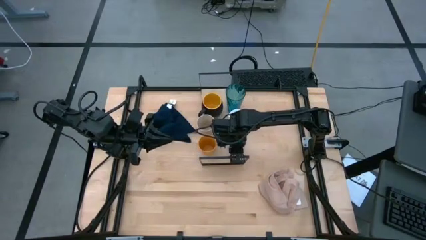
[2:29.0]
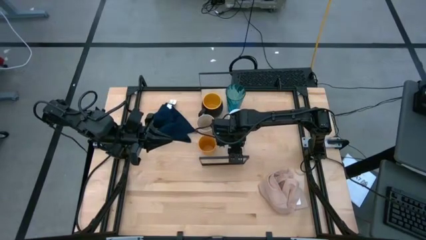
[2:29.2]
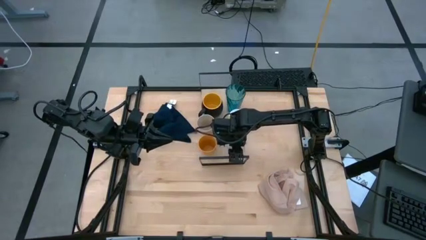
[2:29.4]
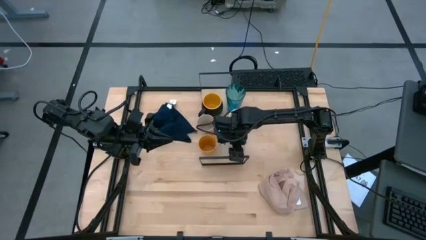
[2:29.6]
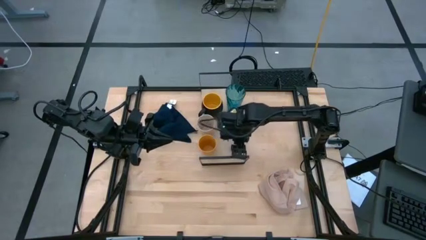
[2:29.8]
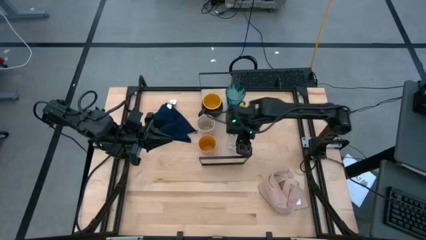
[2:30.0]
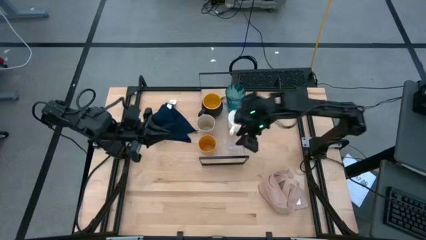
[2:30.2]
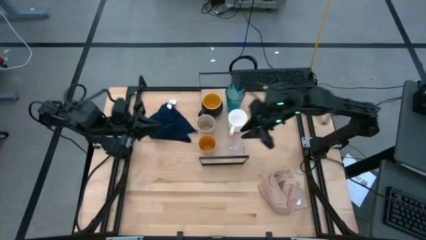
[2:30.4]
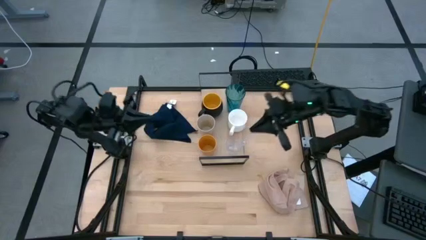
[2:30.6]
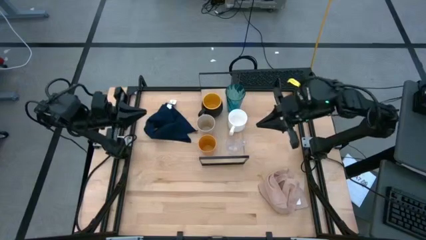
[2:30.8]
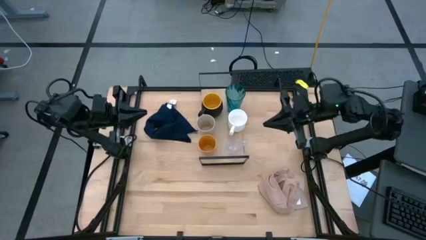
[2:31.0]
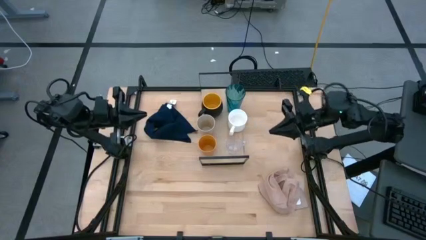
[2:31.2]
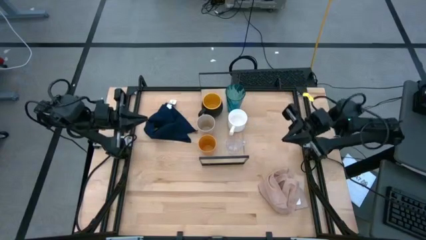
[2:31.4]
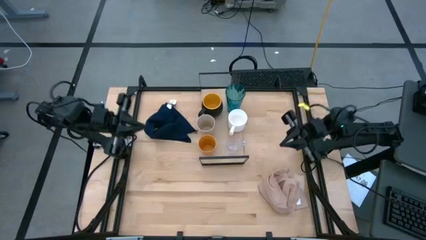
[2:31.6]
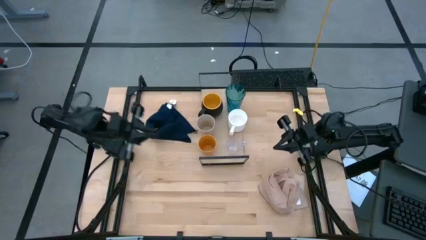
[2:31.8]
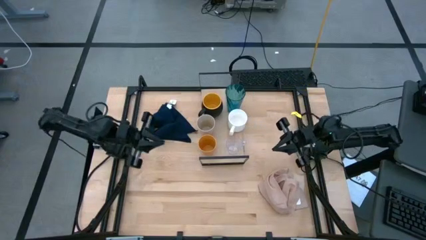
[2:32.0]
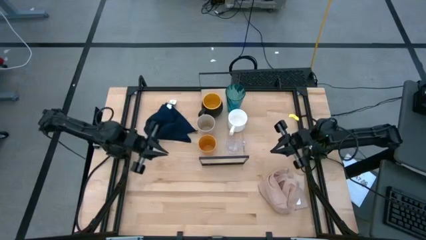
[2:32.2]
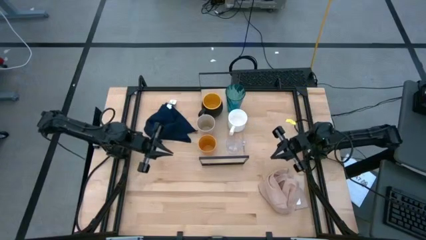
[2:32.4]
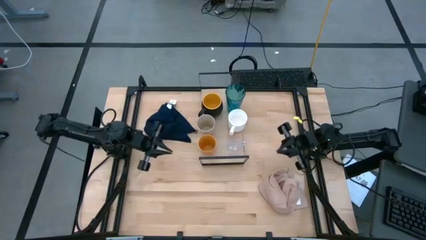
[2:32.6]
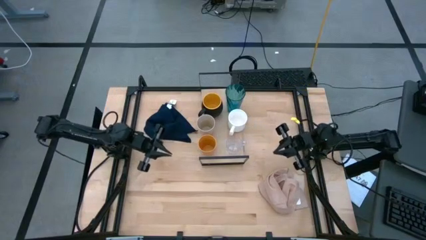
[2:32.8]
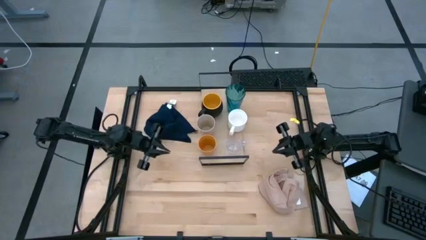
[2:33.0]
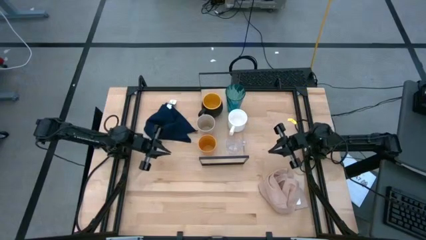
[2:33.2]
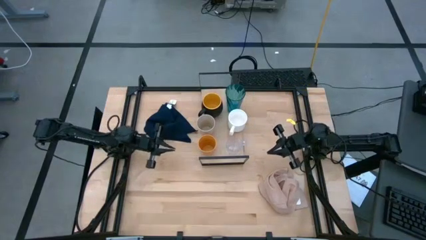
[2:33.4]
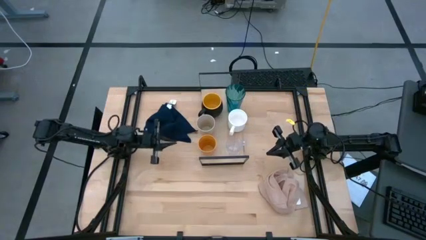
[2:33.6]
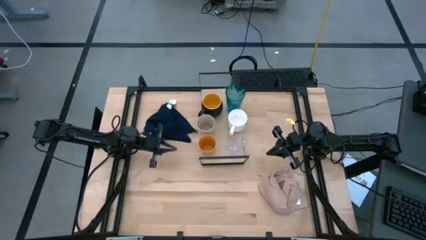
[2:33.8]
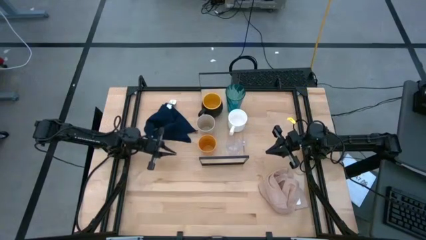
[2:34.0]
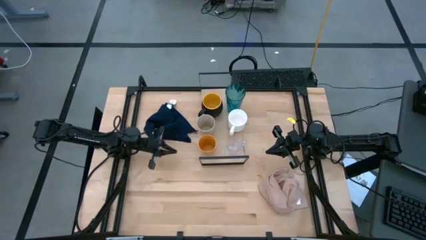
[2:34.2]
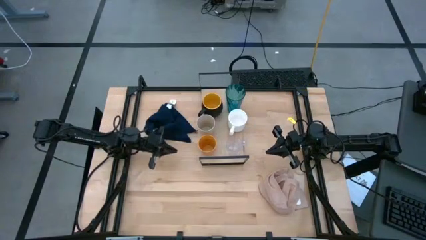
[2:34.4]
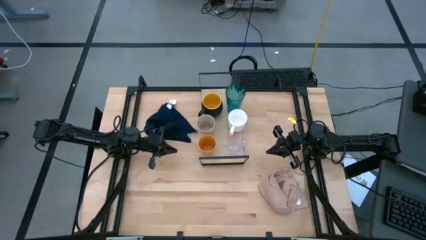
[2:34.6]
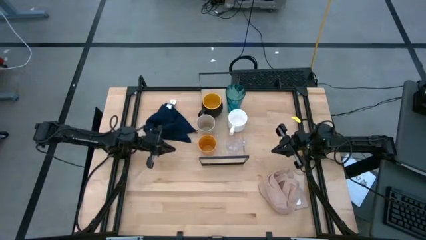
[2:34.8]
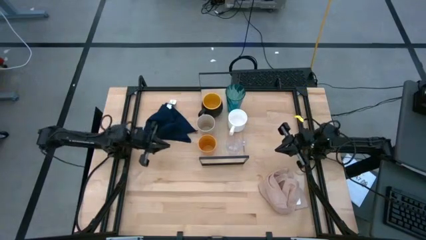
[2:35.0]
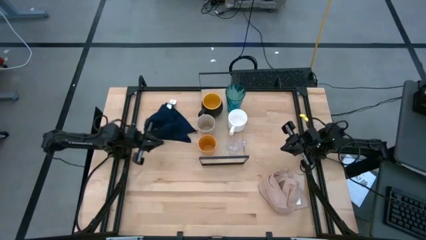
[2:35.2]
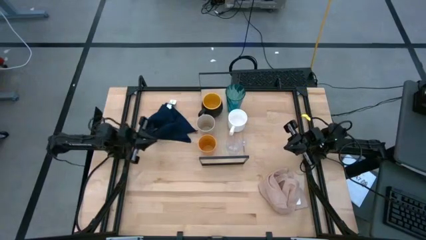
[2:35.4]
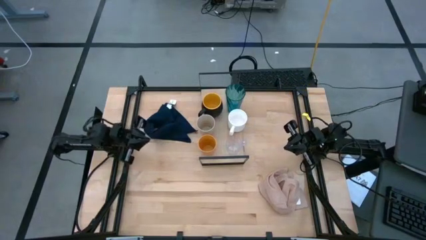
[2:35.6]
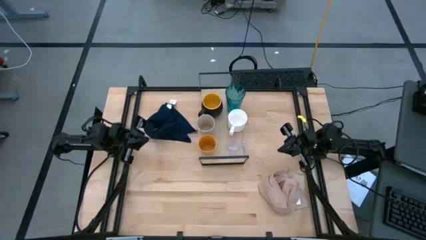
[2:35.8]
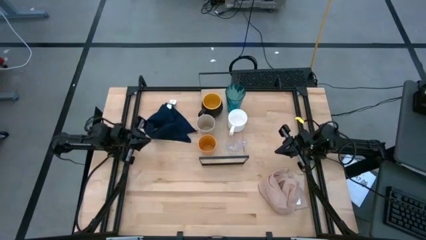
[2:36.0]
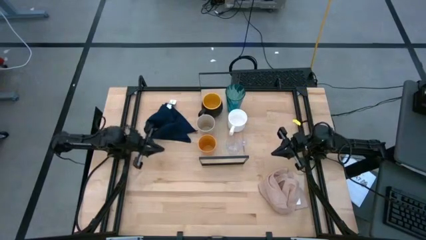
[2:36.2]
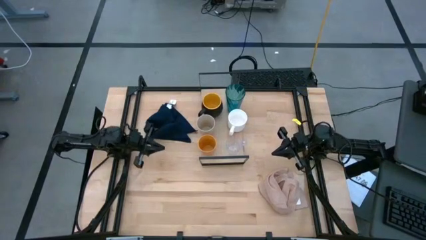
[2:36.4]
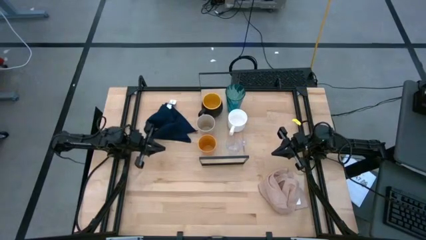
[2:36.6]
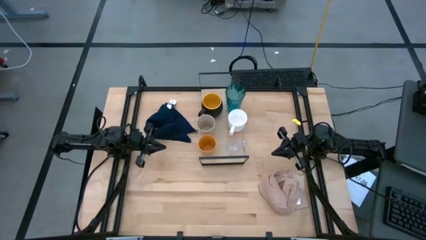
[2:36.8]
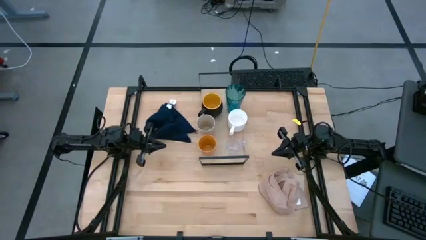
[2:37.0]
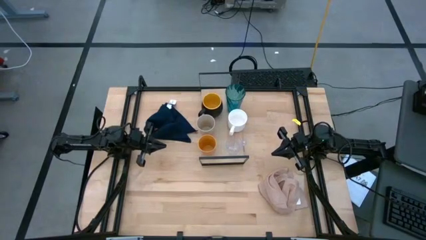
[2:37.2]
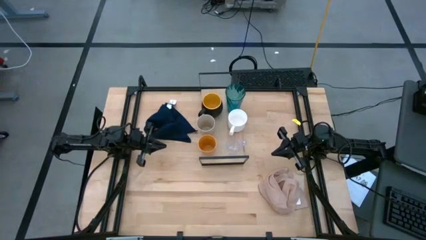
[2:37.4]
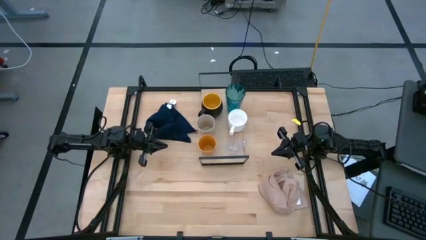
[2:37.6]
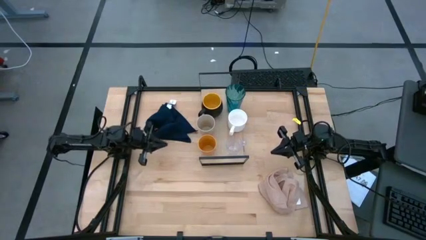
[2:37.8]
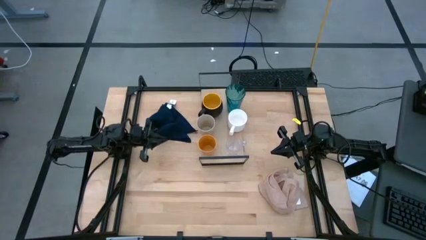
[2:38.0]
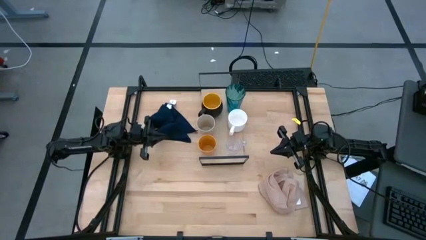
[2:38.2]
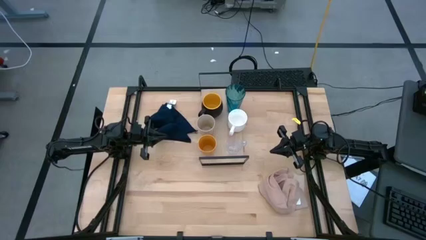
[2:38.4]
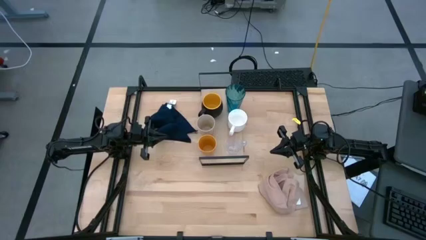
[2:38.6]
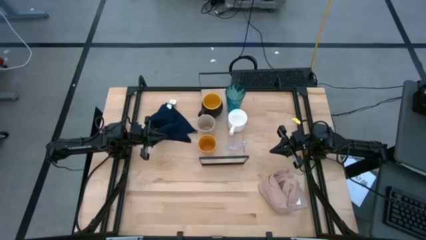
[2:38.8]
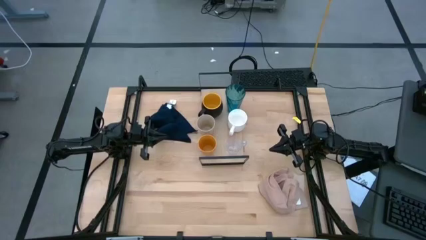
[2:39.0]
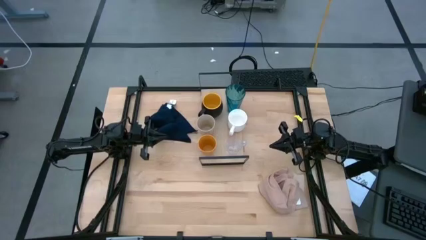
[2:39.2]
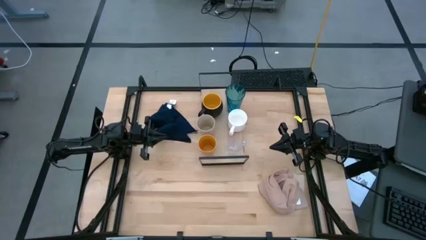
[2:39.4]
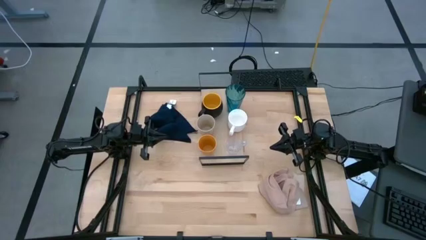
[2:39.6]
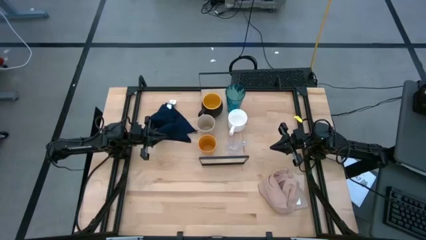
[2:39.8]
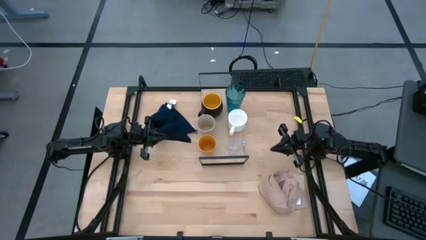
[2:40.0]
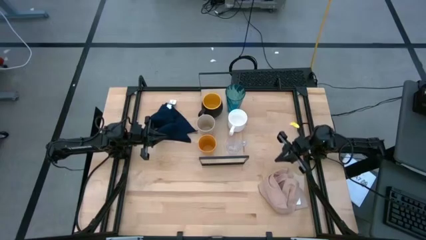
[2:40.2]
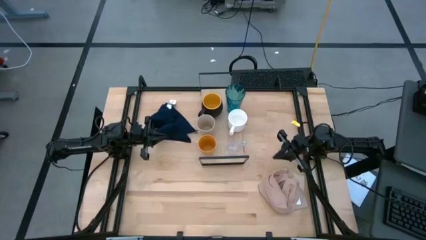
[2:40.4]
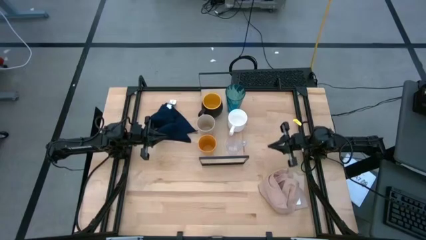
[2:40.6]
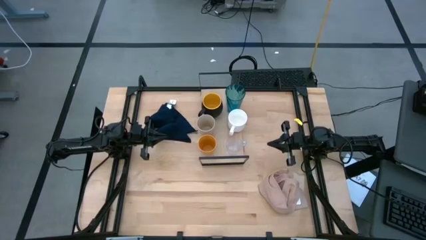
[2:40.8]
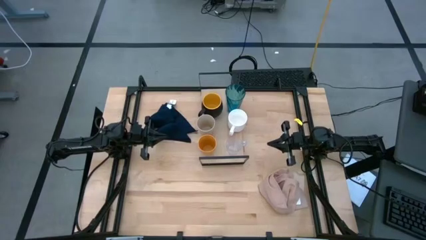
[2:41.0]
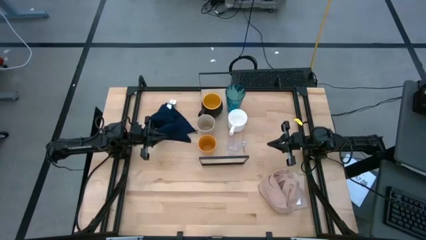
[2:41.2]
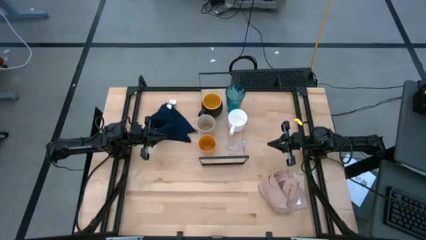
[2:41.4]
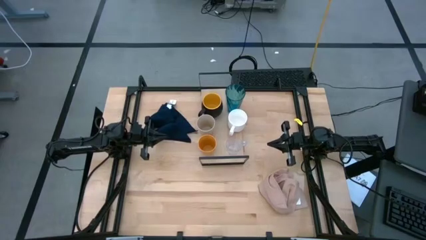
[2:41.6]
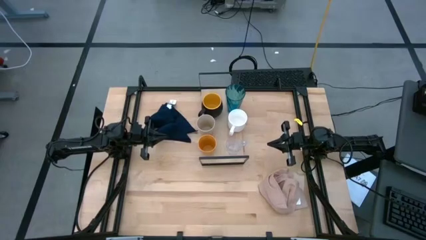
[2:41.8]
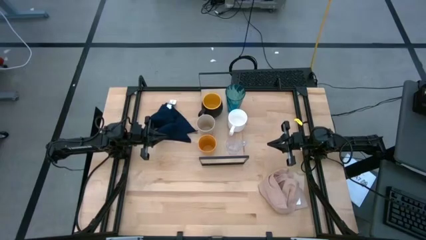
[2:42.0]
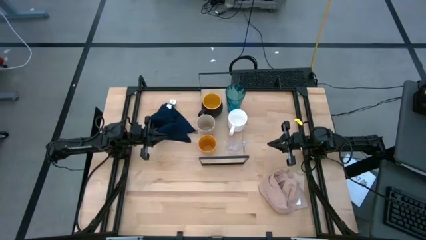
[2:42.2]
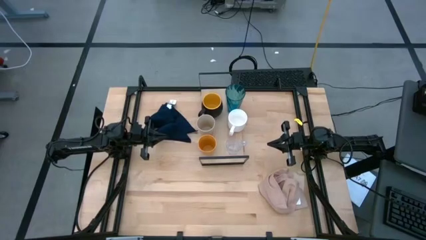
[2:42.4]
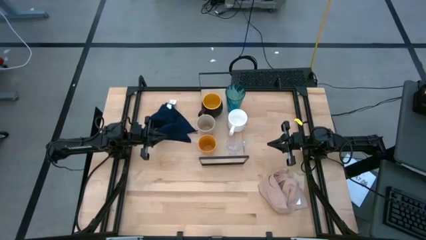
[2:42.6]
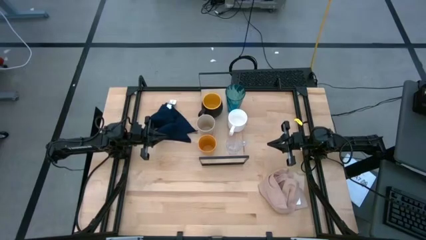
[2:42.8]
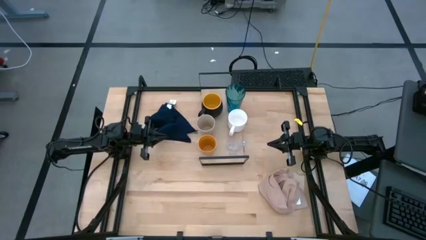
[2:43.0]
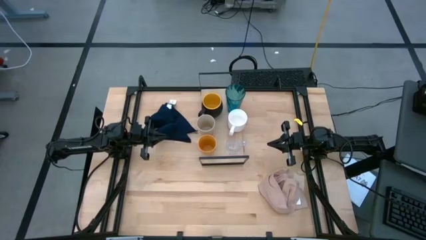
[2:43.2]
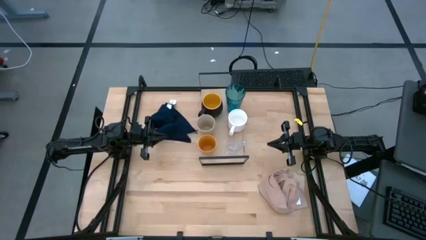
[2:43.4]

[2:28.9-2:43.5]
Task: Stack small to large cups/mugs on shelf
Return to Home Position

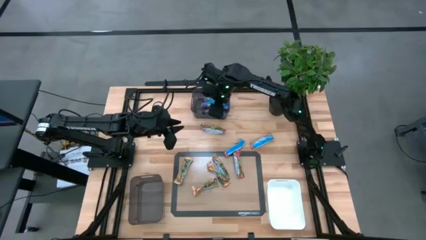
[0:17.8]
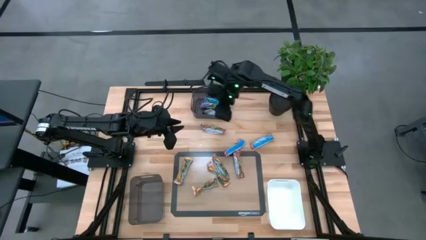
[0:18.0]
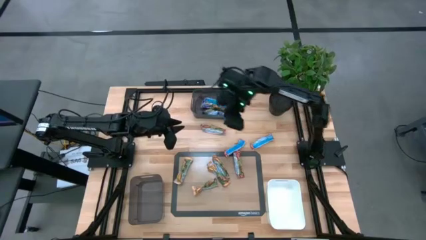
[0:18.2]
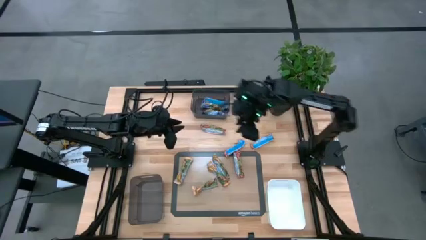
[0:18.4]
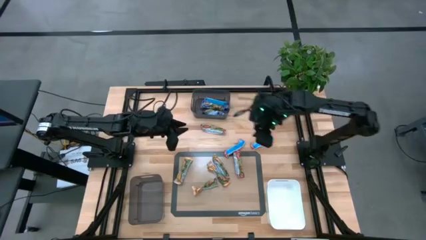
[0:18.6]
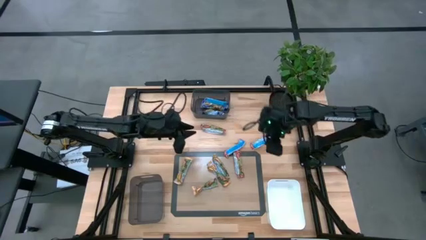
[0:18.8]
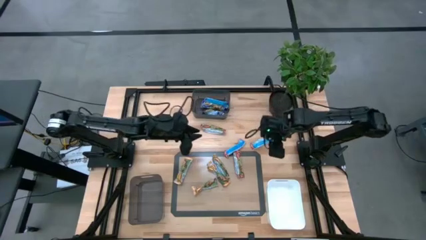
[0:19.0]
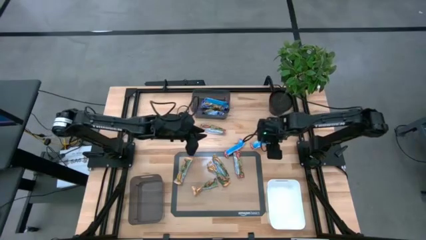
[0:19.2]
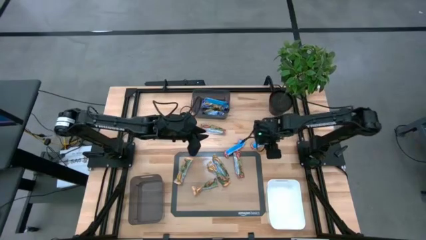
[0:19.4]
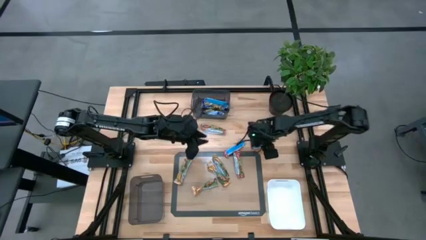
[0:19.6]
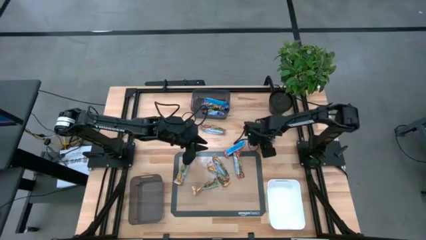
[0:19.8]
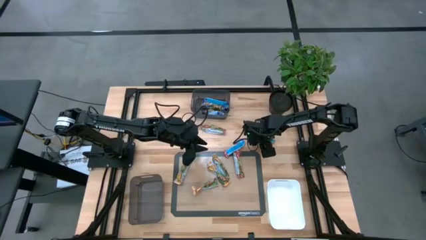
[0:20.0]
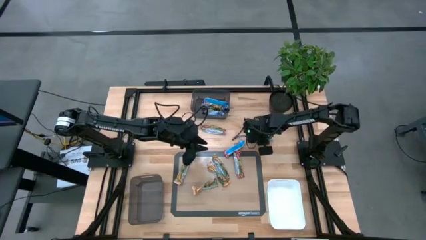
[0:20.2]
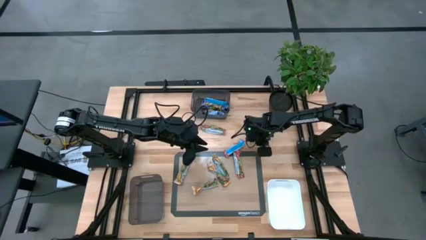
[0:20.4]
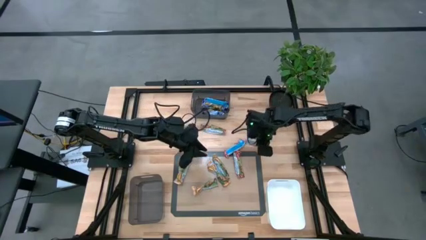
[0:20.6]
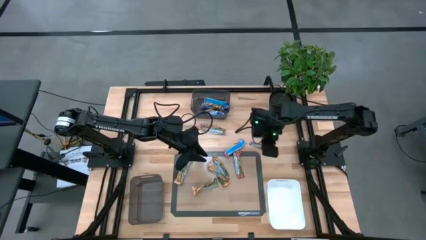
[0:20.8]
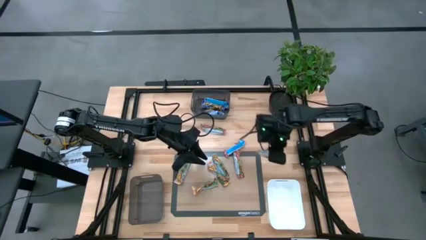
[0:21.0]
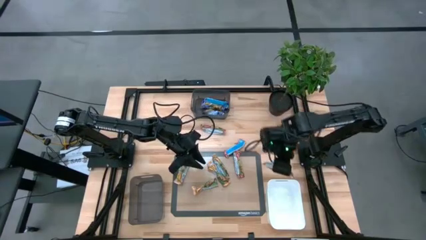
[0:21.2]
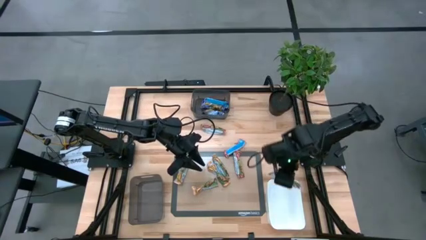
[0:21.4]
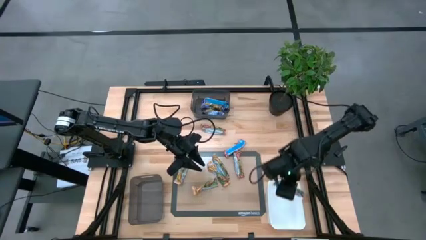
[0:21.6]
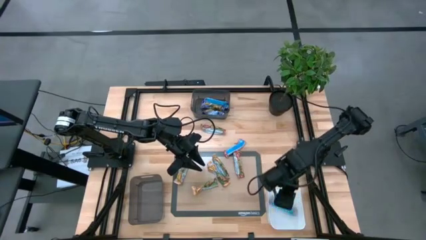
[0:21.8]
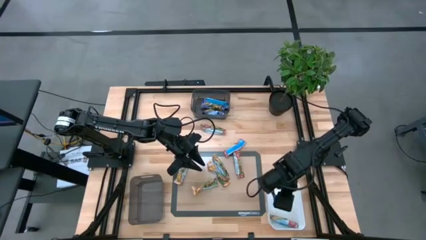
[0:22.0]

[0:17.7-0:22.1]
Task: Pick and place Granola Bars by type
Put the top right red snack bar into the white bin
